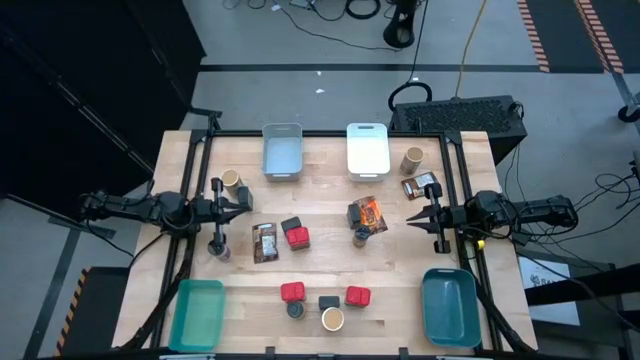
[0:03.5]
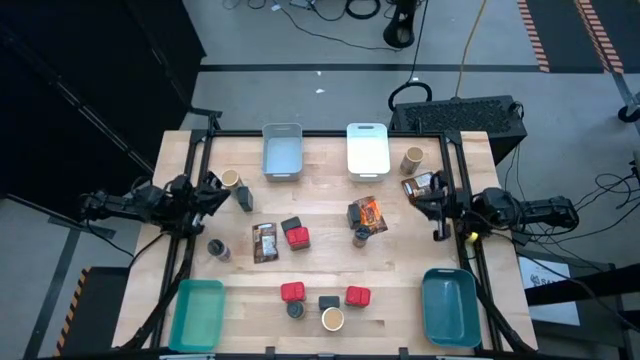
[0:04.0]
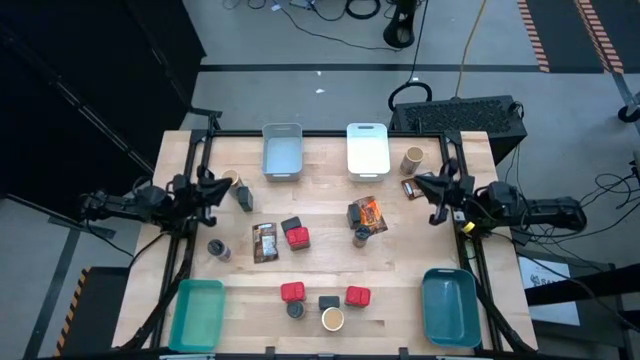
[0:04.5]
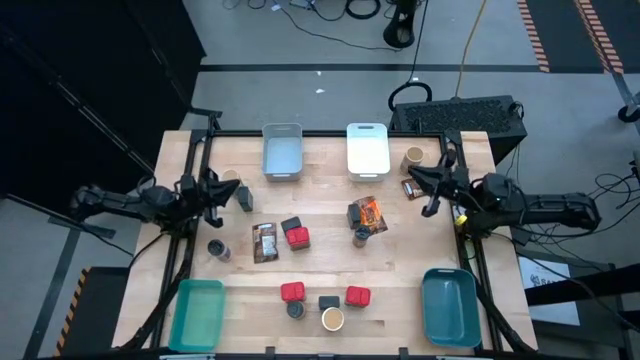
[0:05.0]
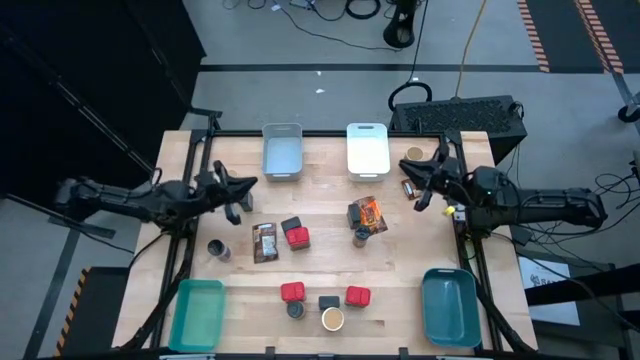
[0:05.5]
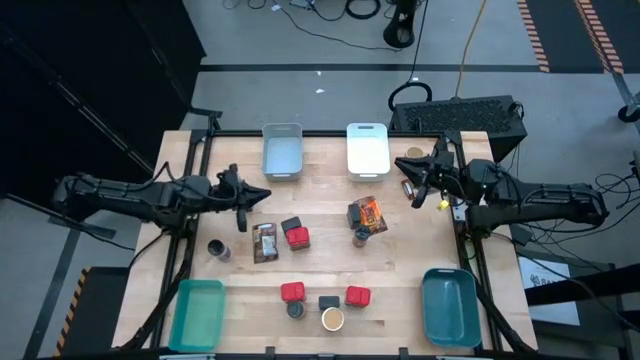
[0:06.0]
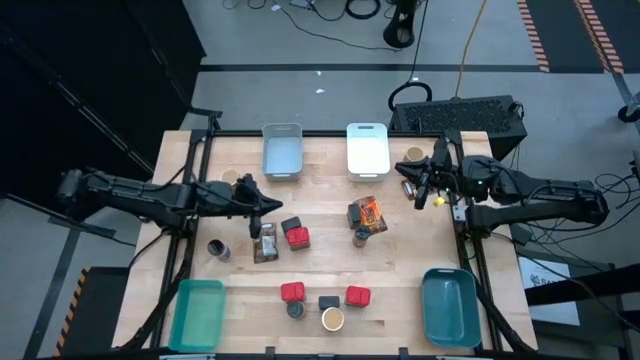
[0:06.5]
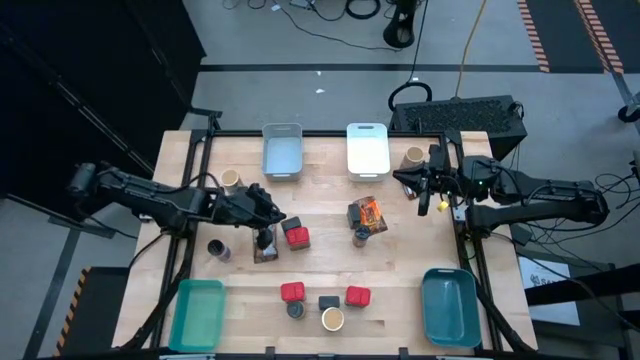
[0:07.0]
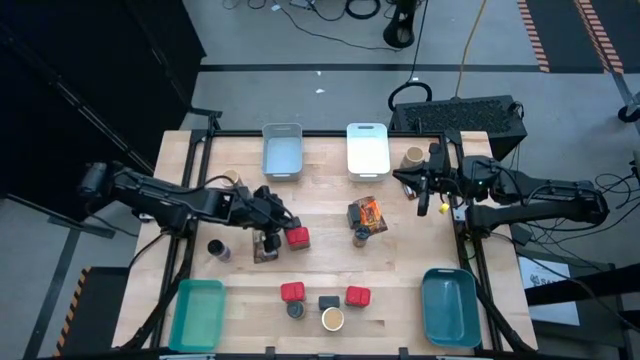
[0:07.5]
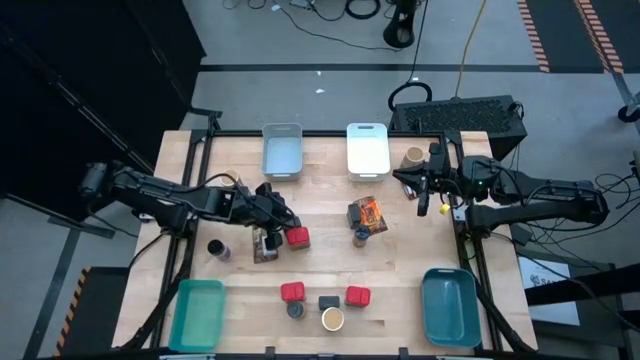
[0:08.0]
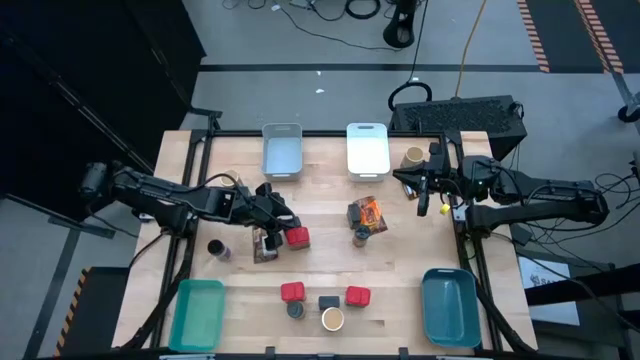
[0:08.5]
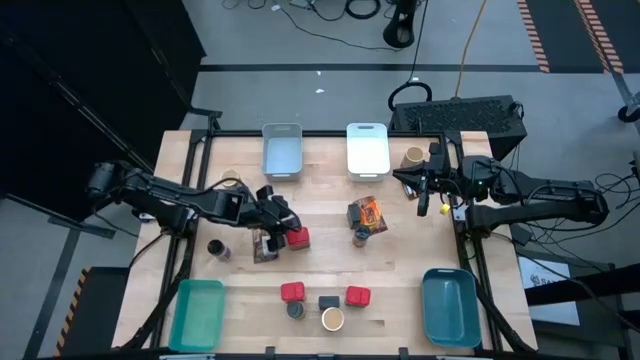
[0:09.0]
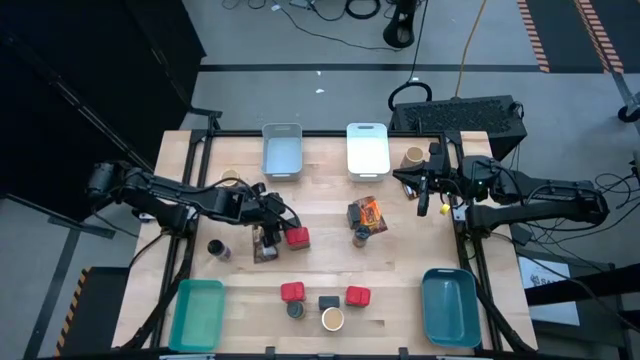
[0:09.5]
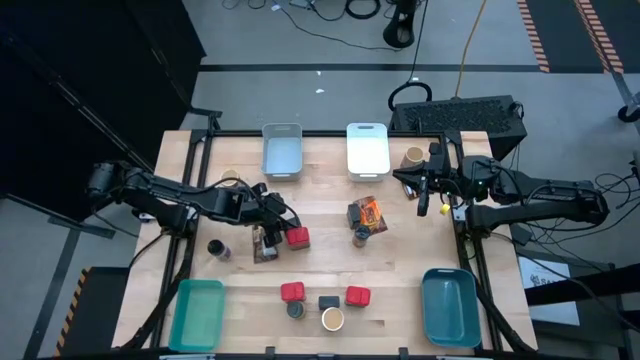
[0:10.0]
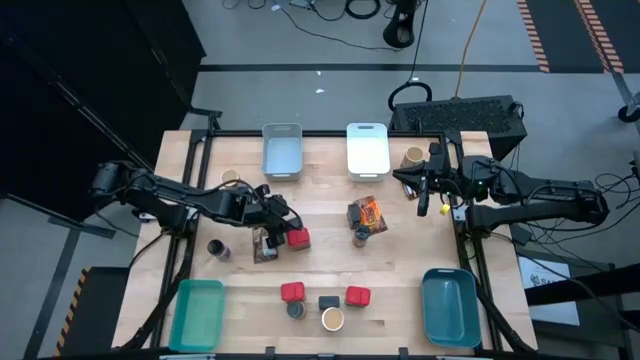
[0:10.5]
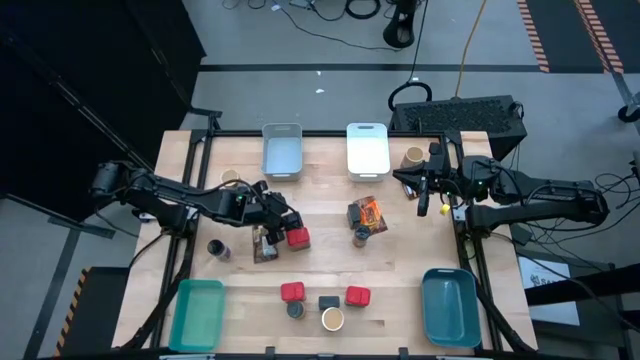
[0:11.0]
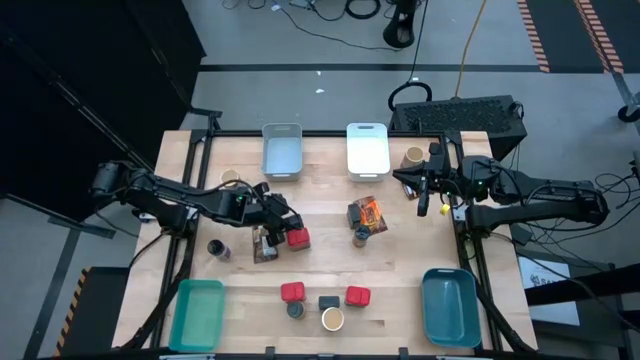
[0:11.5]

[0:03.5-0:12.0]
Task: Sort spices by type
Put the black spice can into the gray bin

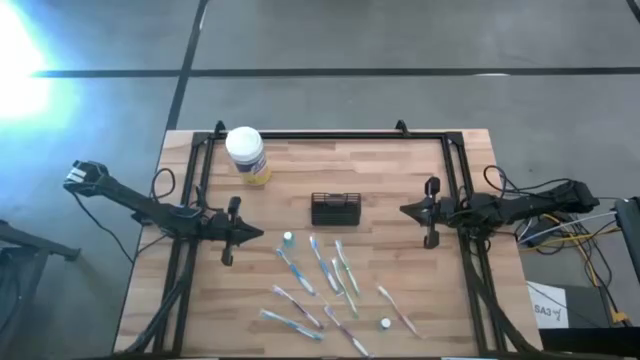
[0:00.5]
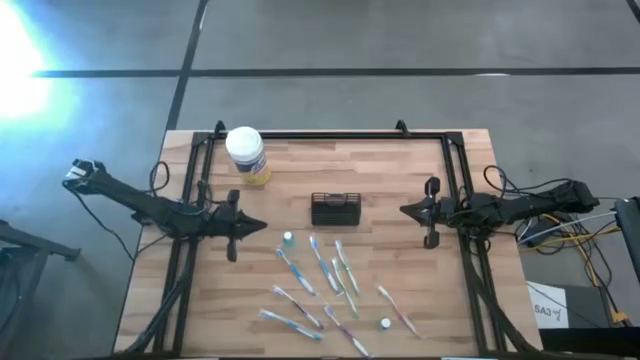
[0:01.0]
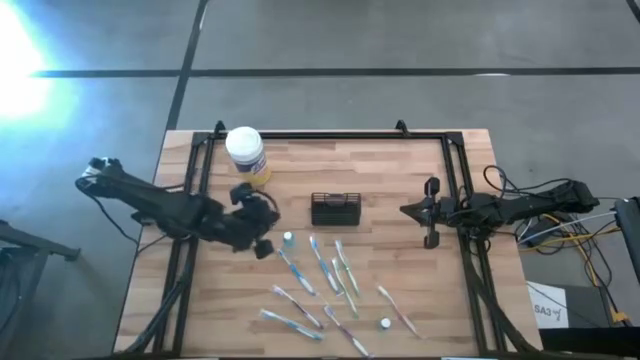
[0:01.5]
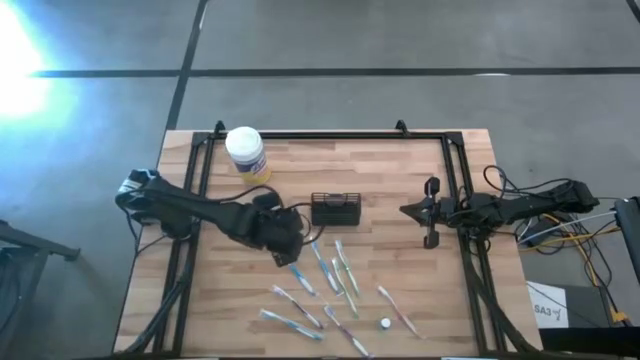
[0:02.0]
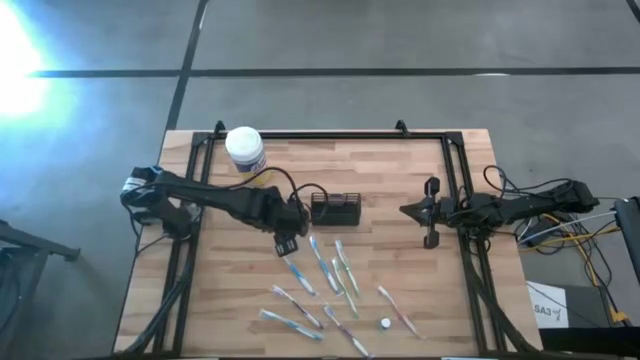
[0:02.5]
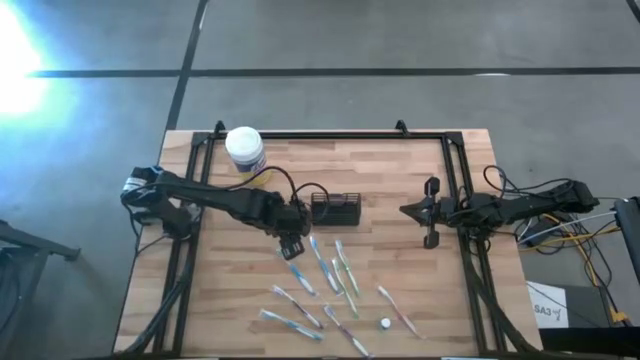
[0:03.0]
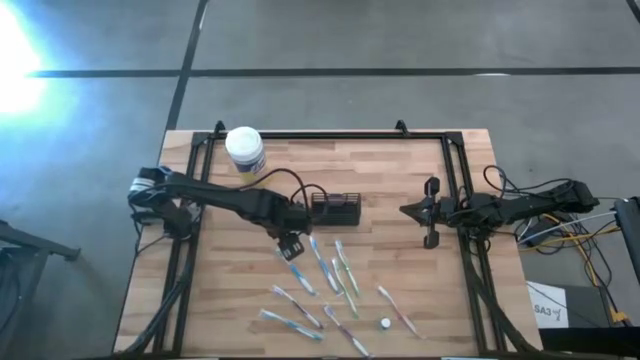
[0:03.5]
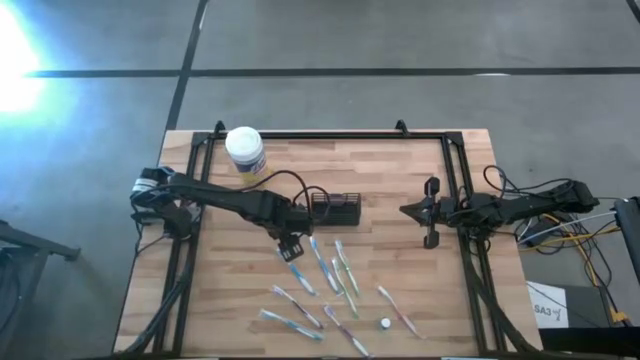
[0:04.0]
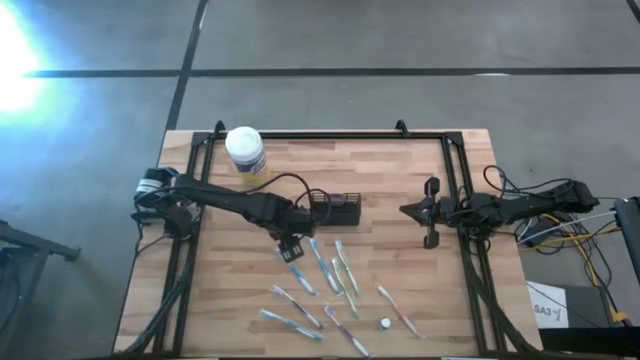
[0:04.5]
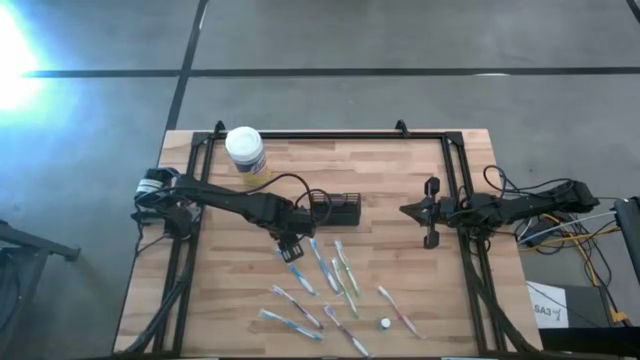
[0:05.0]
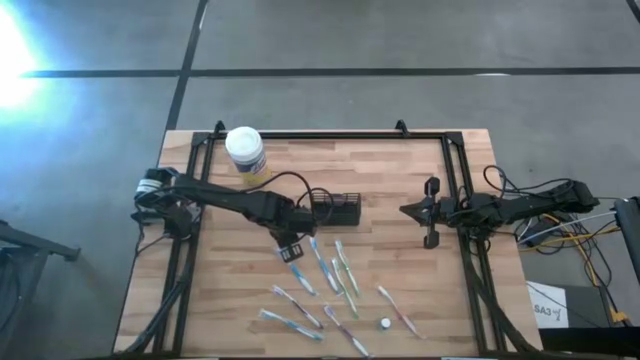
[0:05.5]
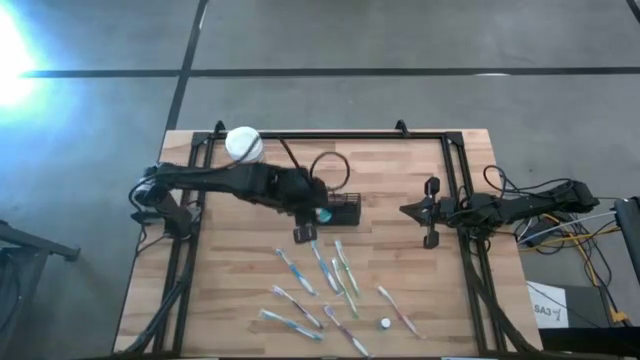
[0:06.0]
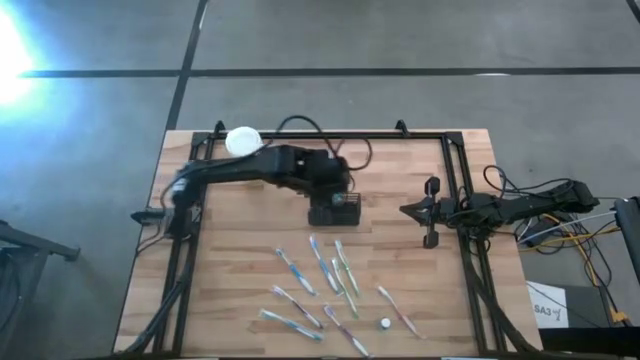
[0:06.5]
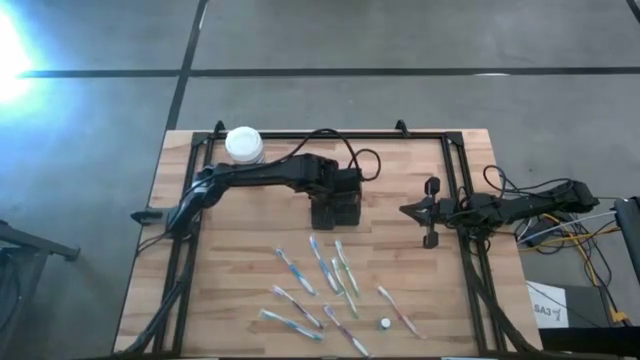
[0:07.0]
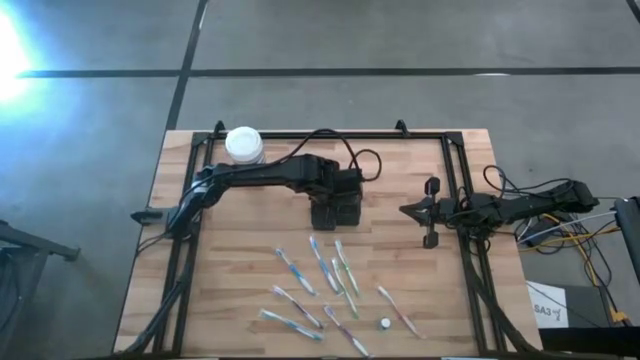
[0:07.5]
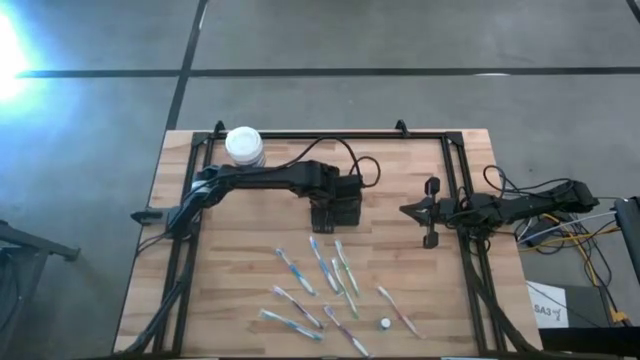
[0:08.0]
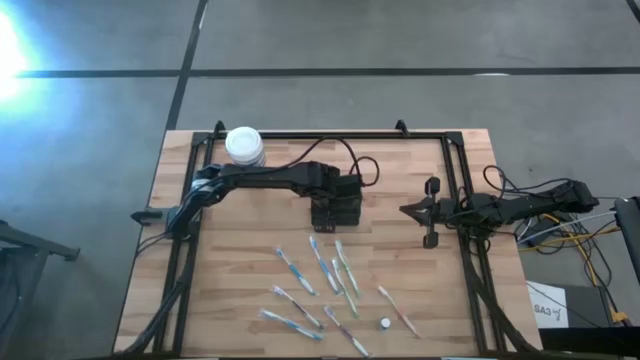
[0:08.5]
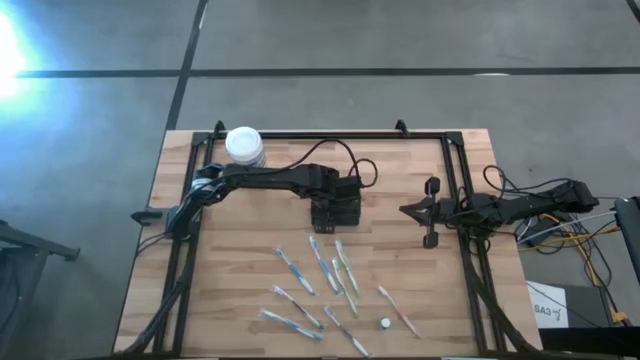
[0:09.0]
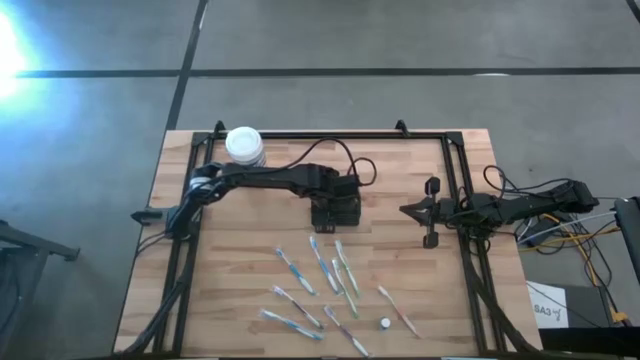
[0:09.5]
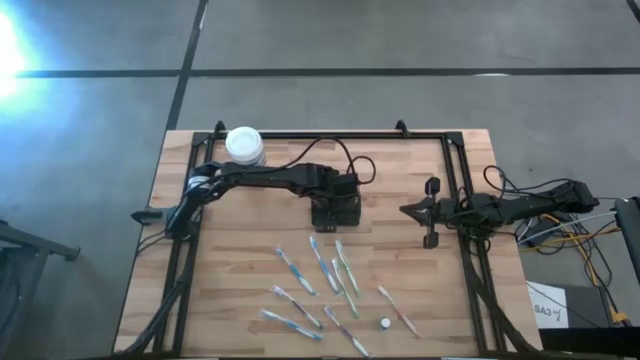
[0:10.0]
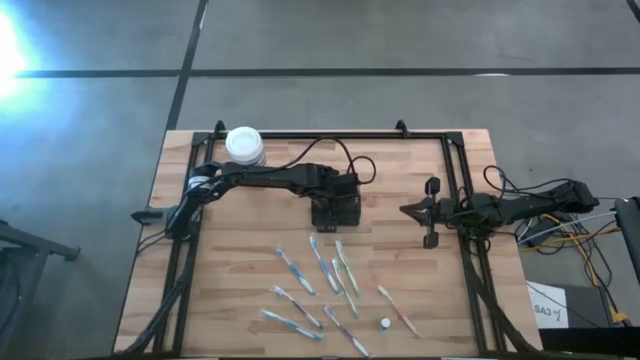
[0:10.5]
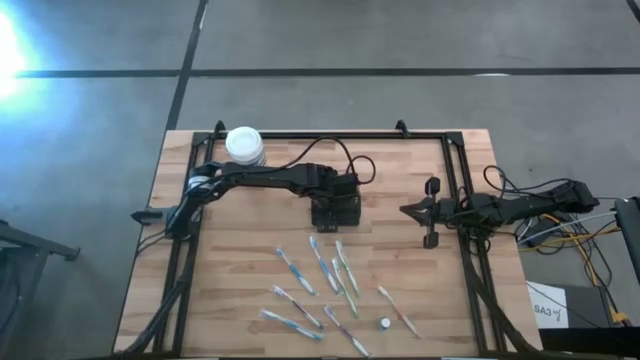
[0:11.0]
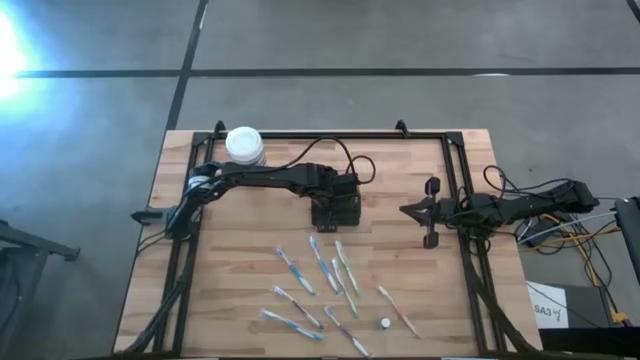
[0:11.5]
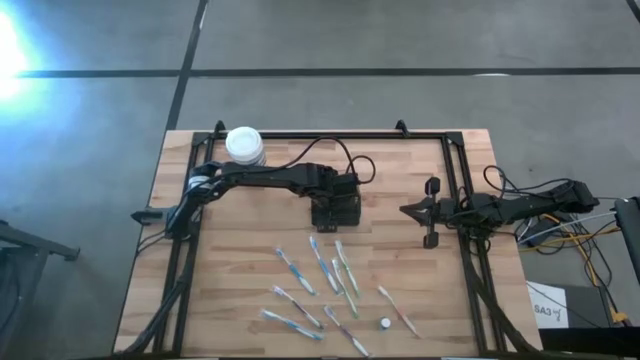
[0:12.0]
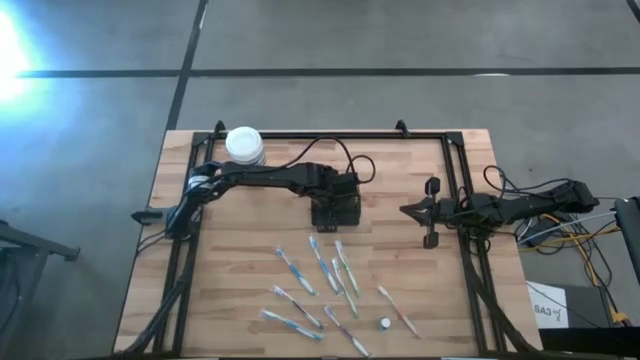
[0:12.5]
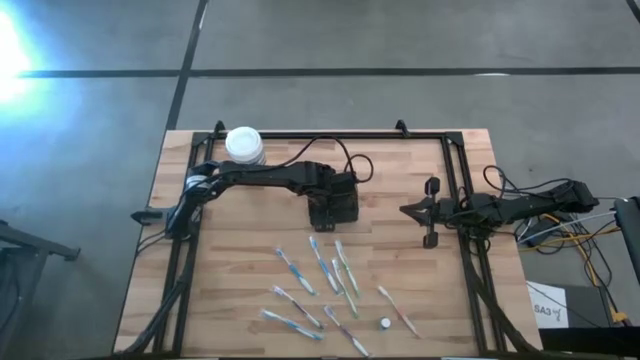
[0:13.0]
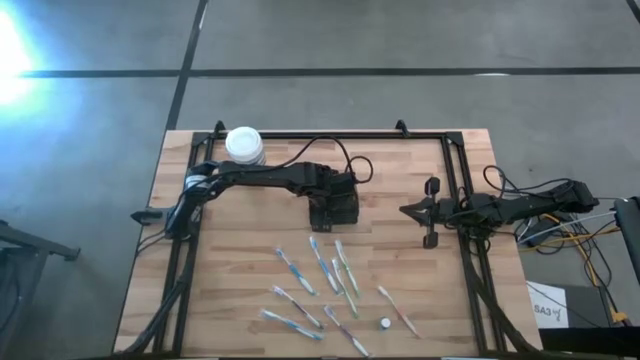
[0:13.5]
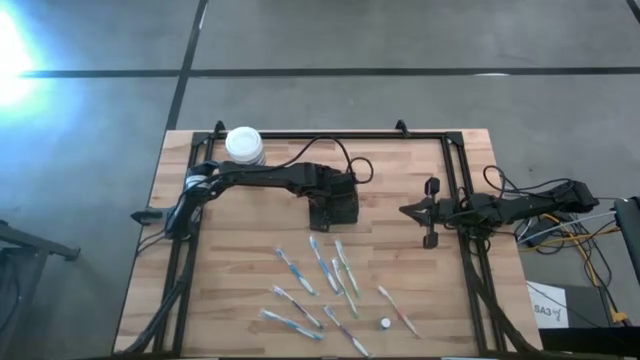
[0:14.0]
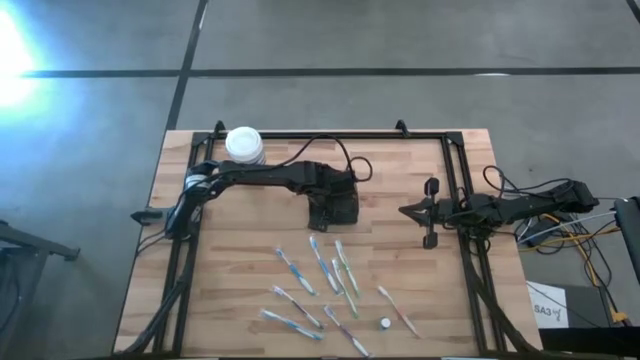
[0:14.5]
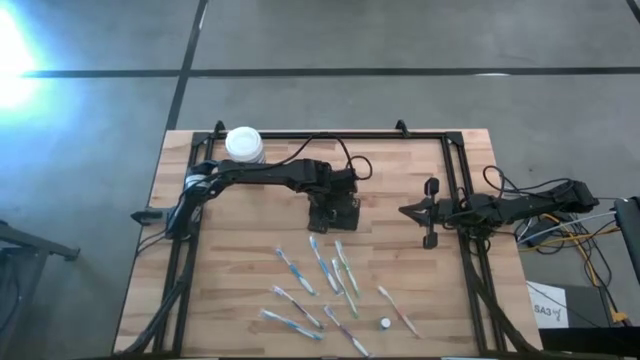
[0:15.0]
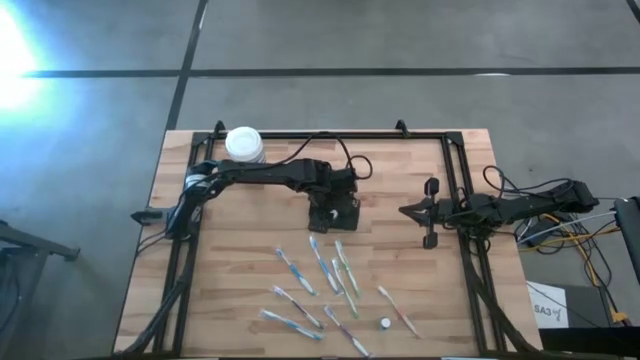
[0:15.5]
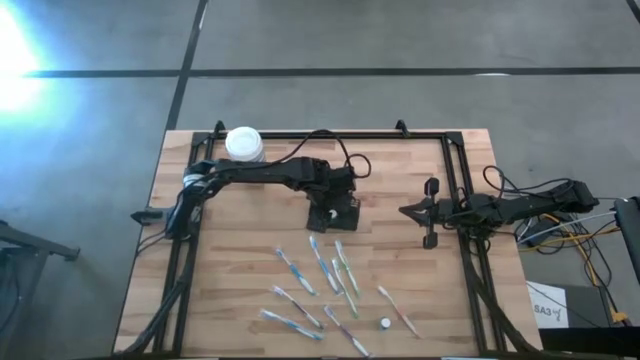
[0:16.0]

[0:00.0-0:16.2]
Task: Pick & Place toothbrushing station
Put the top mouthwash into the black mesh organizer
